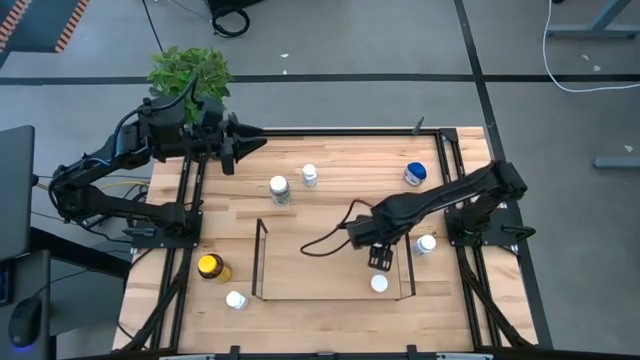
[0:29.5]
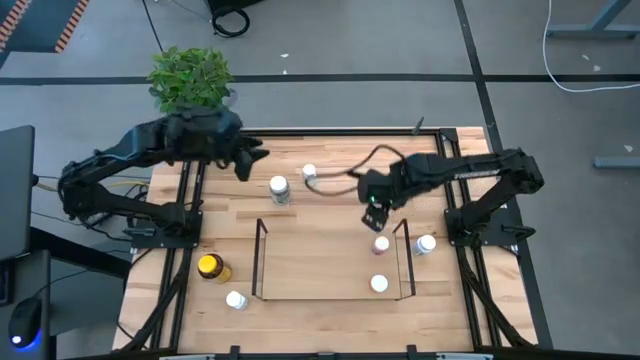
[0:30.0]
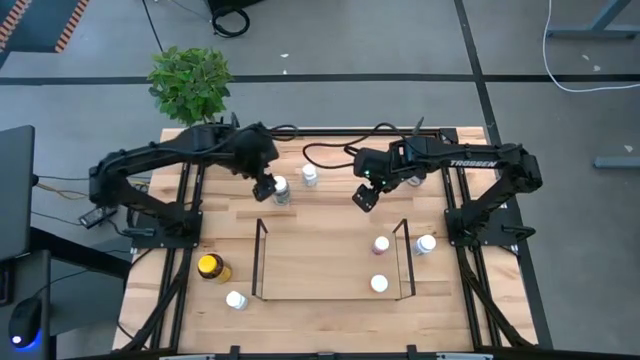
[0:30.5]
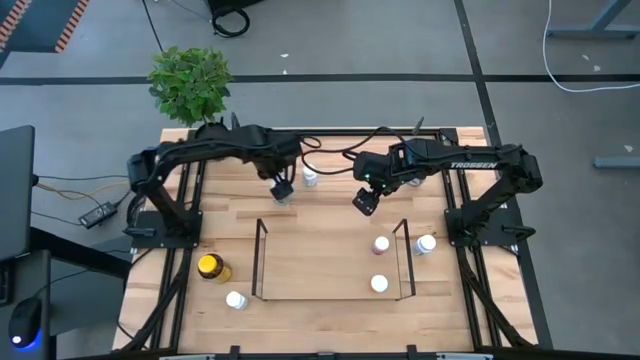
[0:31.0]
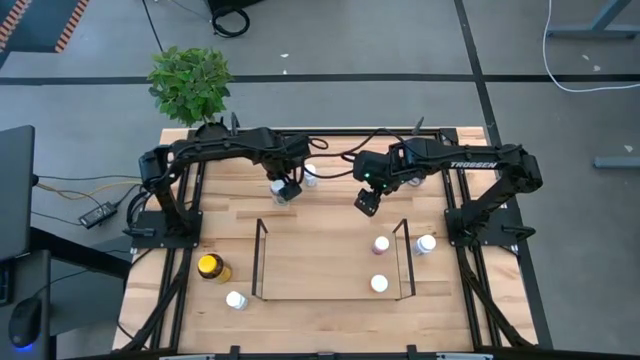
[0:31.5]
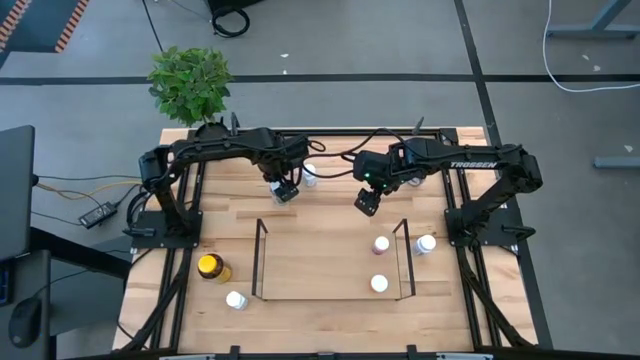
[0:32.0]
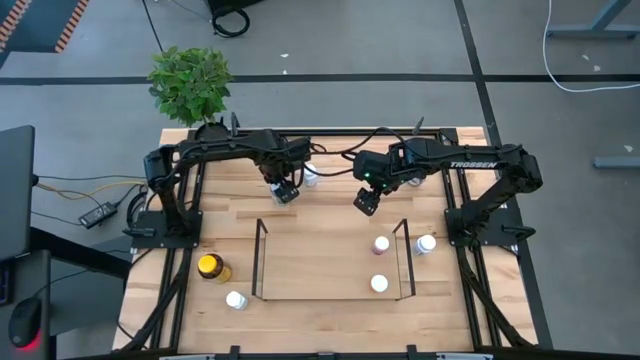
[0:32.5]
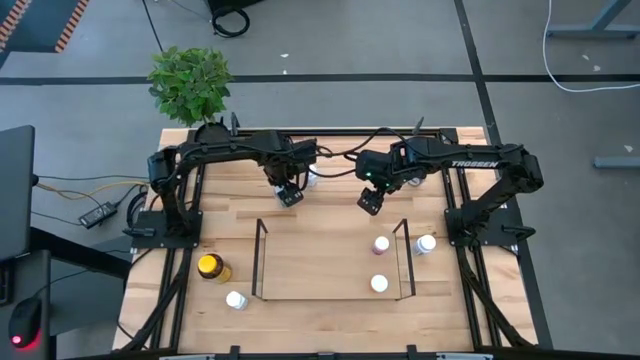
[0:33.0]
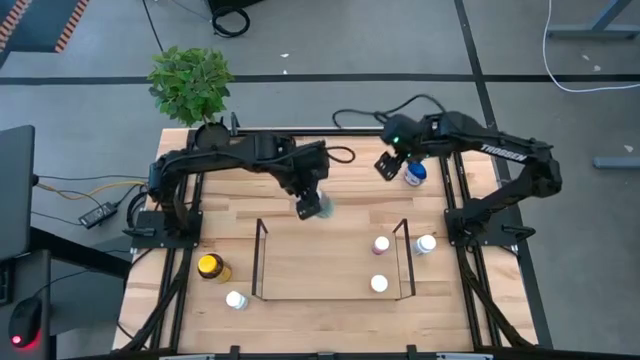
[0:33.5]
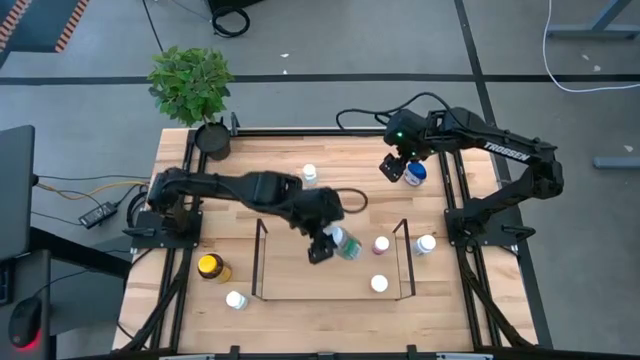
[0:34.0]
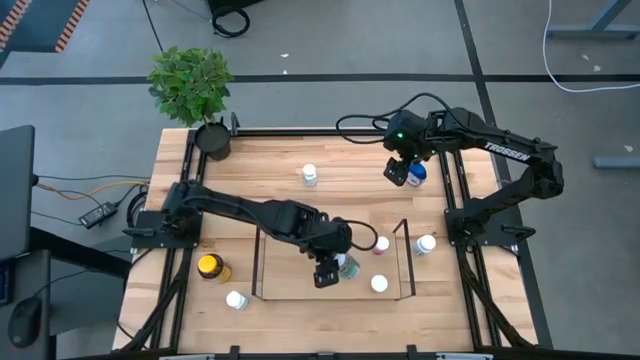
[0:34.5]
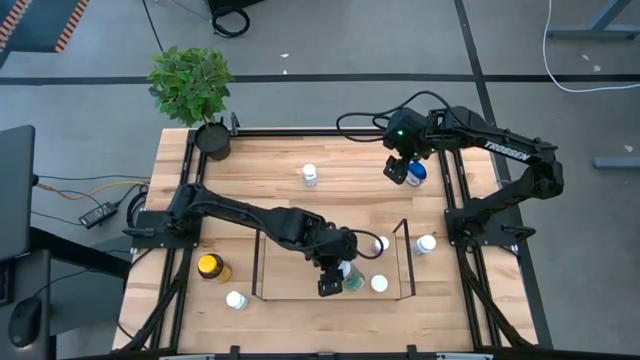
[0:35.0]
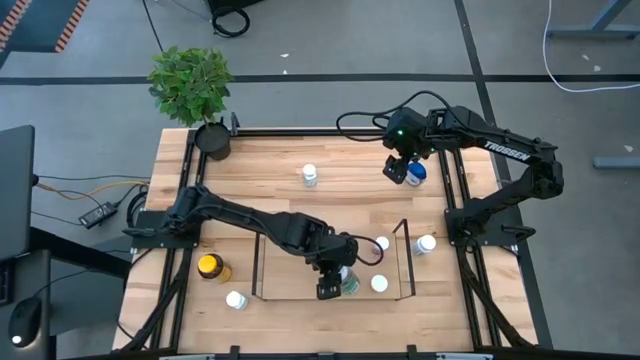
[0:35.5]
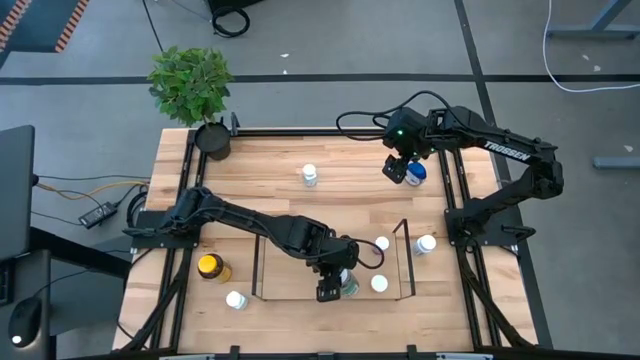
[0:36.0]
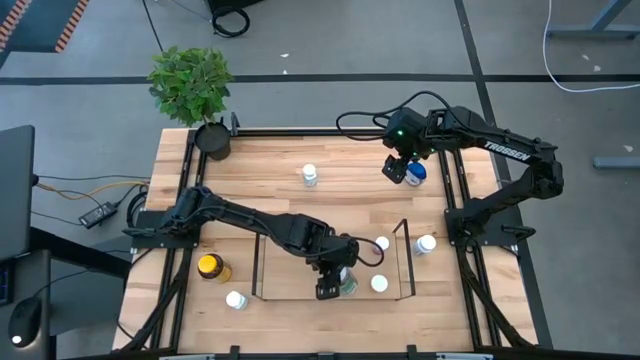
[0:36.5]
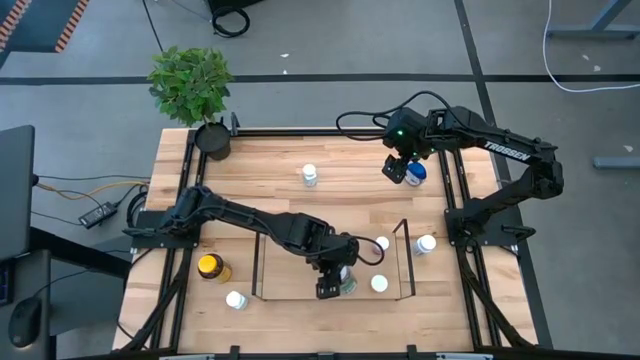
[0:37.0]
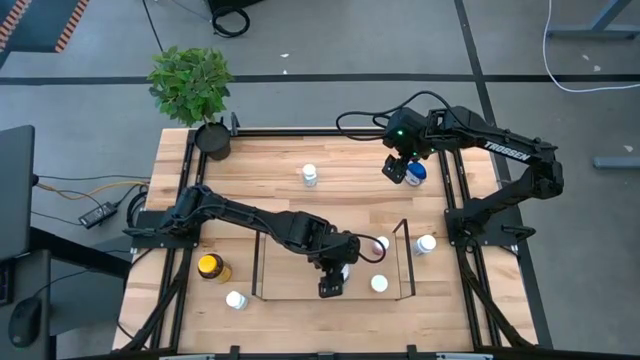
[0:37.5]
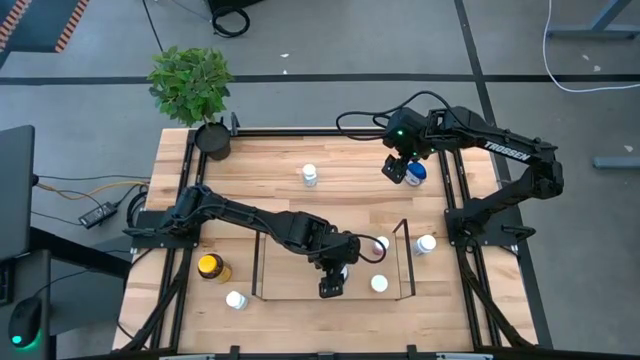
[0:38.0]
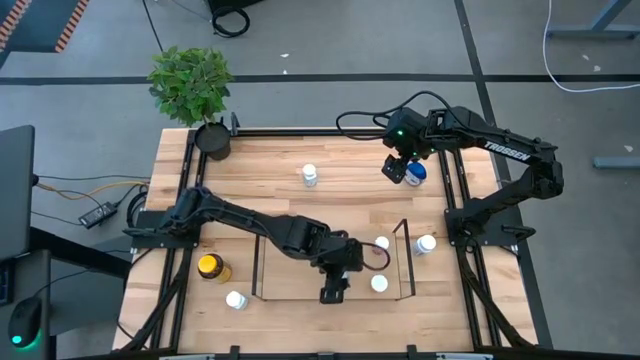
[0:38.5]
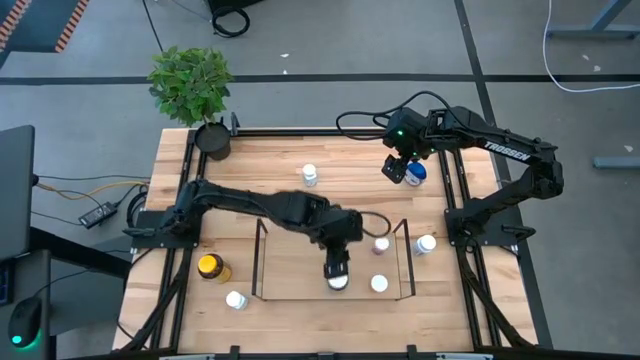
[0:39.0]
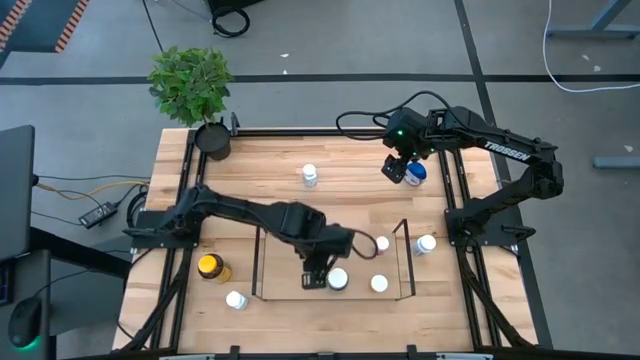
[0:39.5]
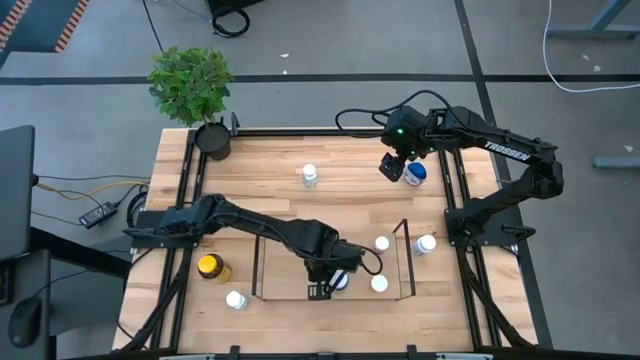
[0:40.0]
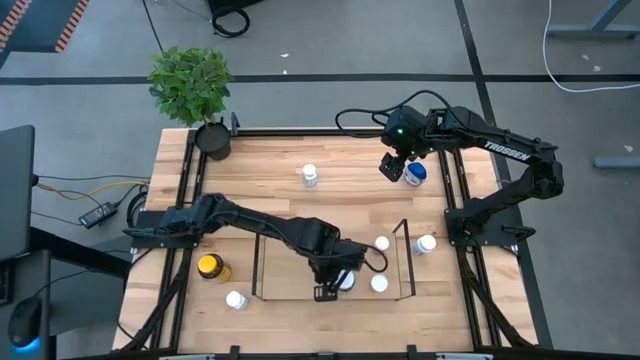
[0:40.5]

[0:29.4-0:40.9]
Task: Pick and place medicine bottles onto shelf by color
Put the green pill bottle on the shelf

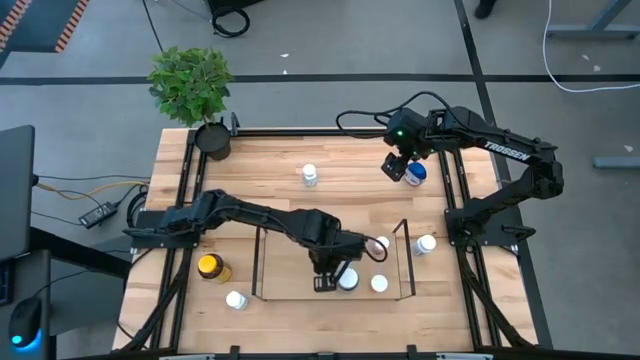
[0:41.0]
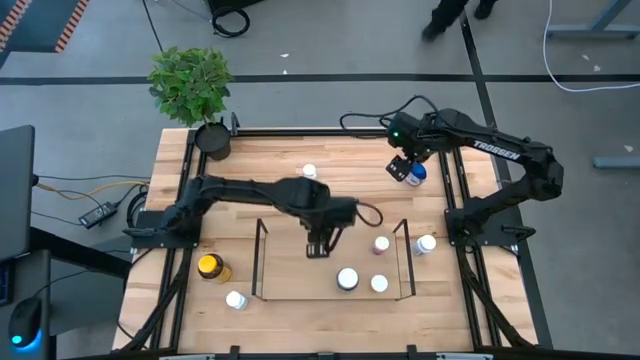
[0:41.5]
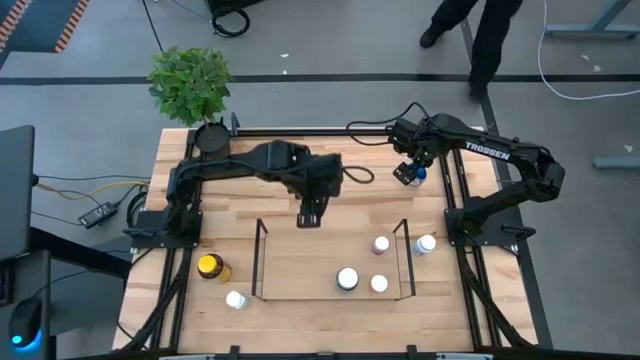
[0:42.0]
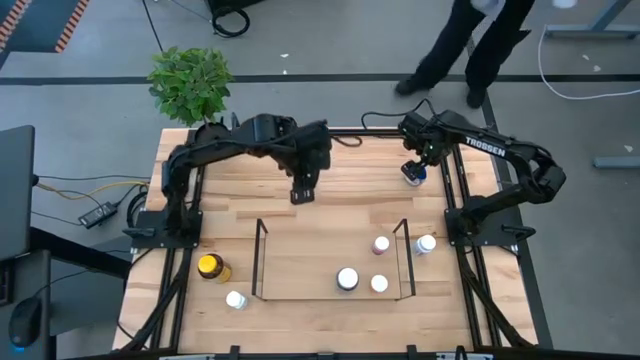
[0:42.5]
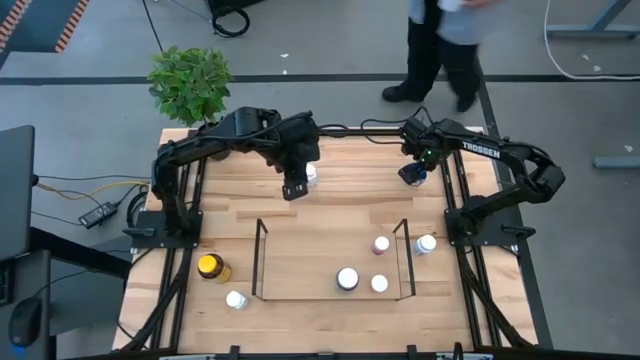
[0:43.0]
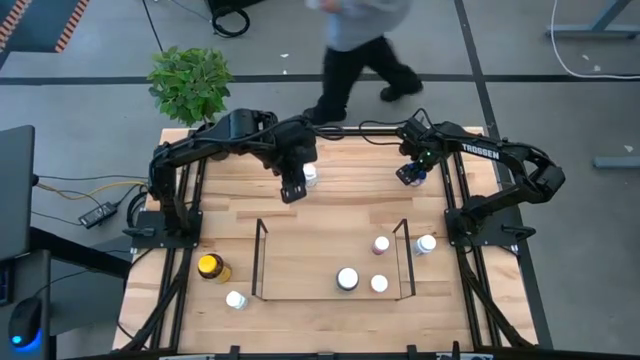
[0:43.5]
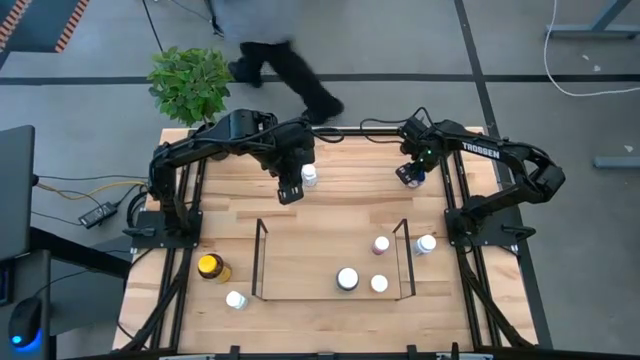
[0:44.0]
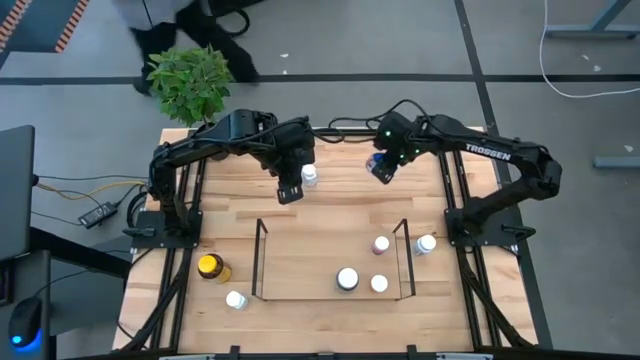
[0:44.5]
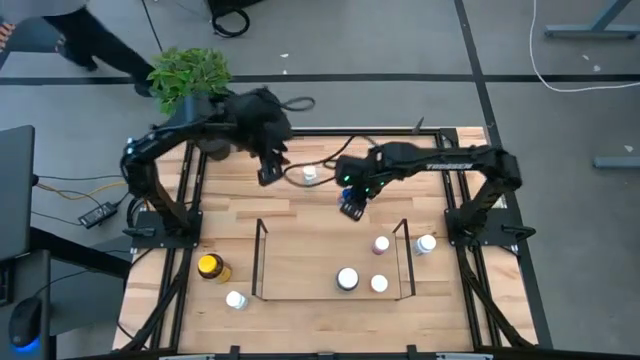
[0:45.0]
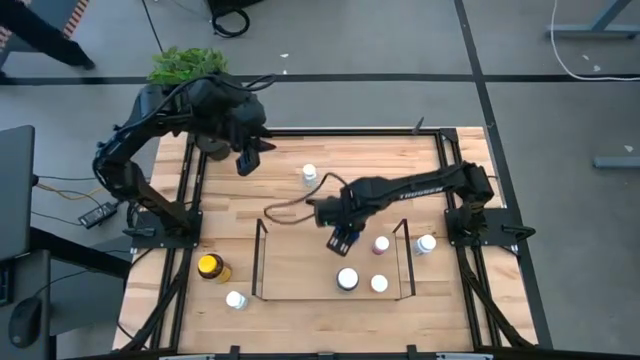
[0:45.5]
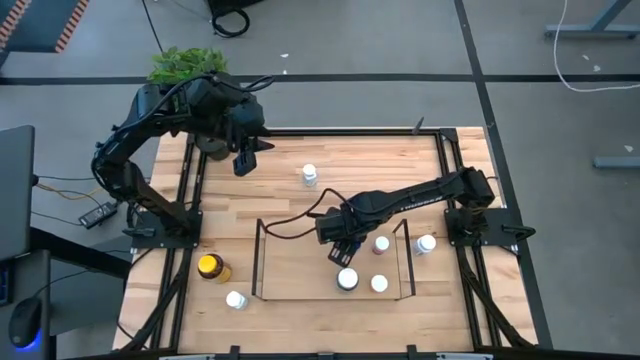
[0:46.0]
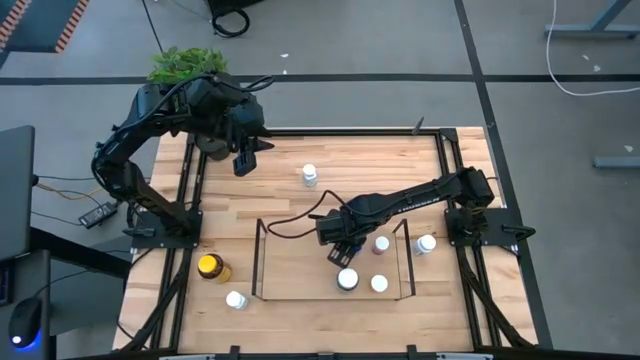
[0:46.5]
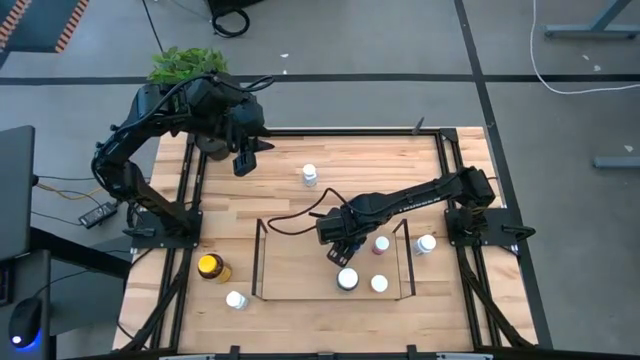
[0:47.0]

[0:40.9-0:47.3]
Put the blue pill bottle on the shelf

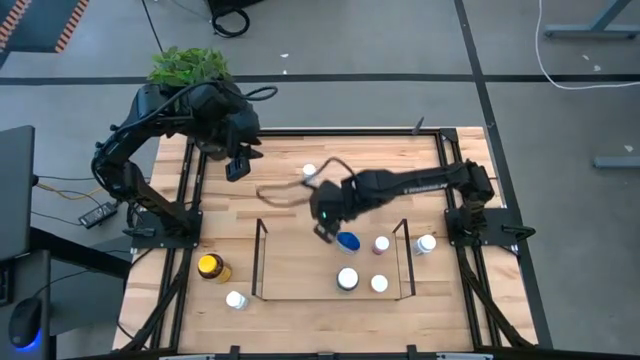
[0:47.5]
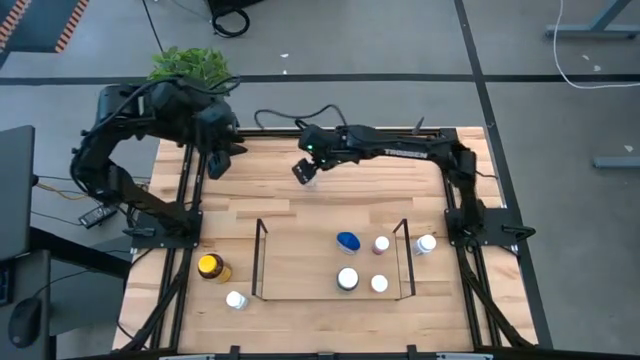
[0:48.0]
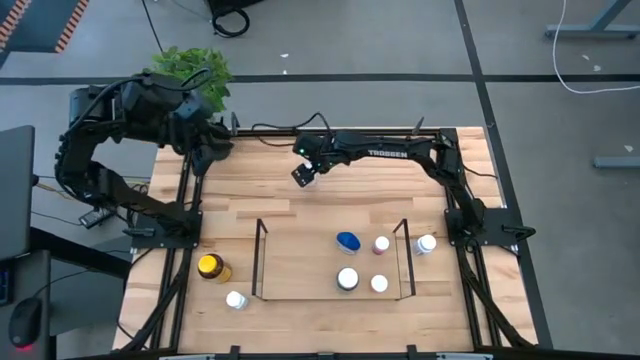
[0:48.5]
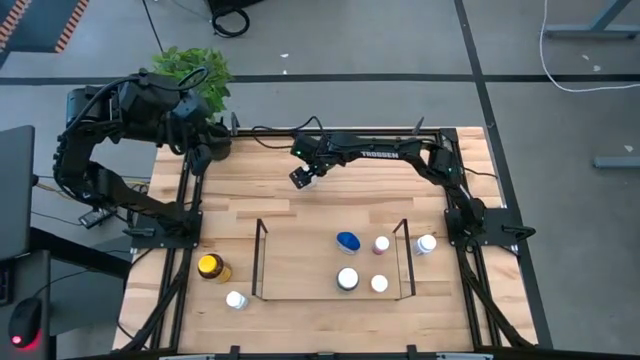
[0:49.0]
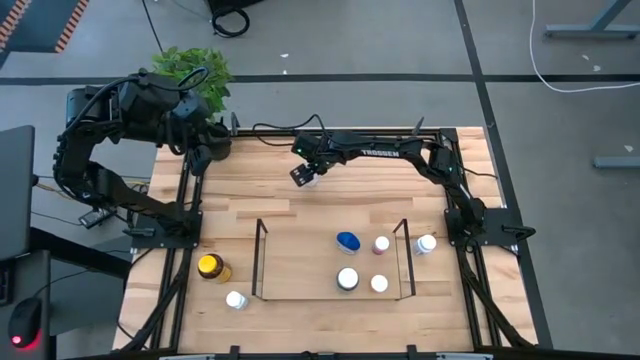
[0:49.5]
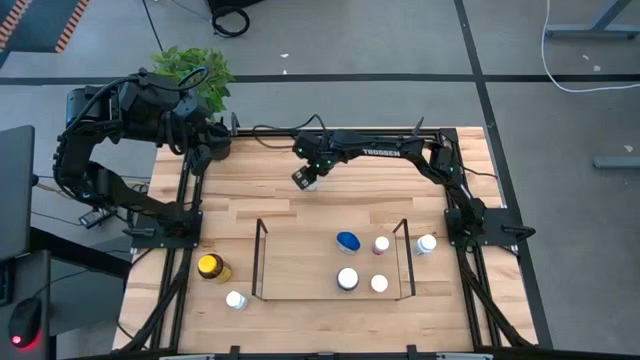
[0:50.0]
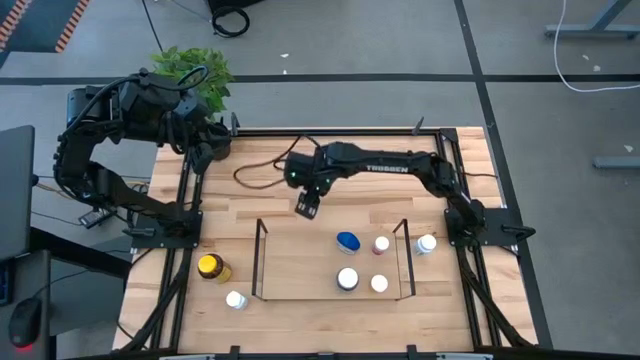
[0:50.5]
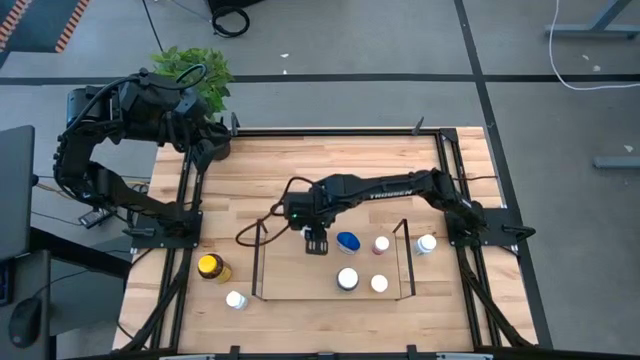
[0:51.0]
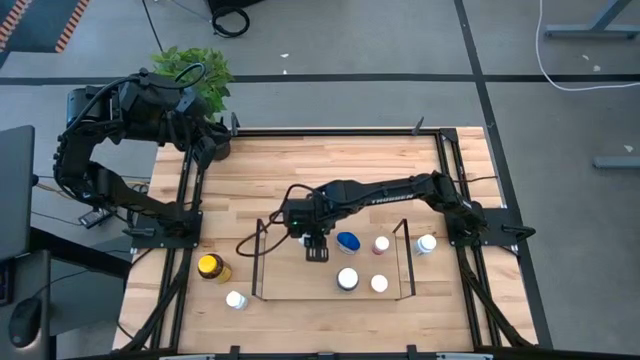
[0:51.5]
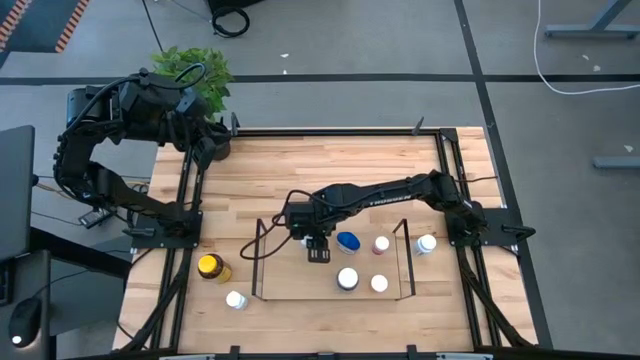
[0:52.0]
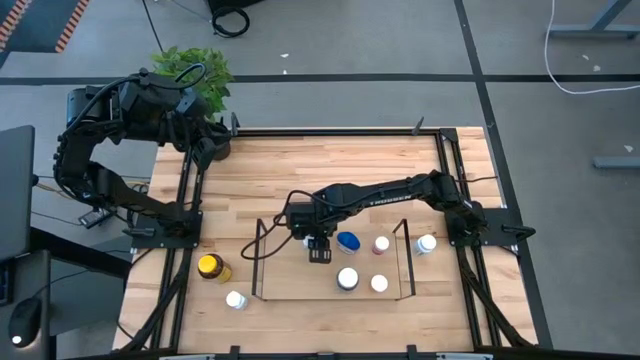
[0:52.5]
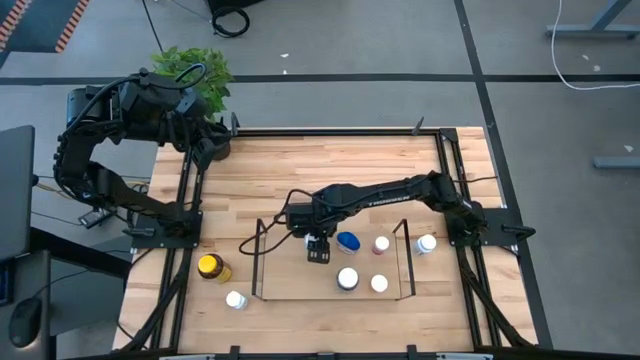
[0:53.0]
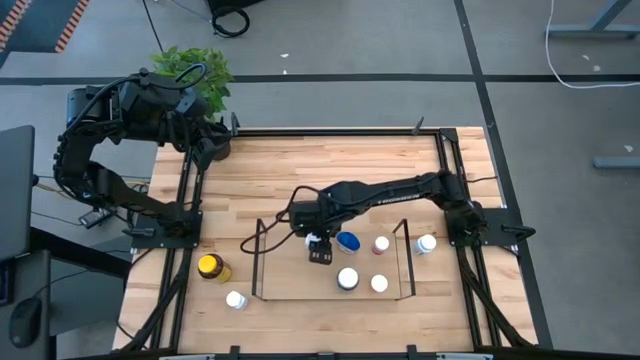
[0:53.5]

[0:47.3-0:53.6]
Put the blue patterned pill bottle on the shelf
